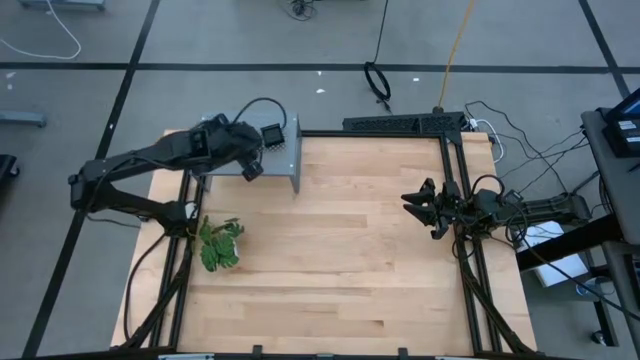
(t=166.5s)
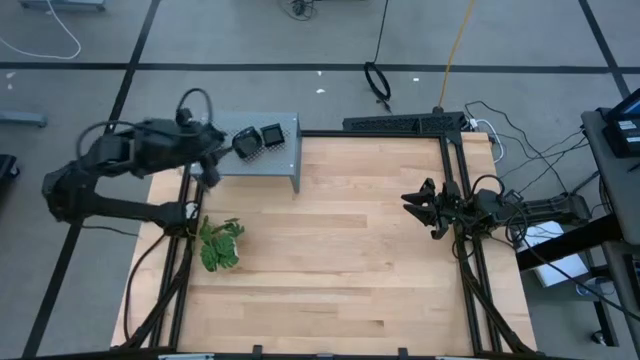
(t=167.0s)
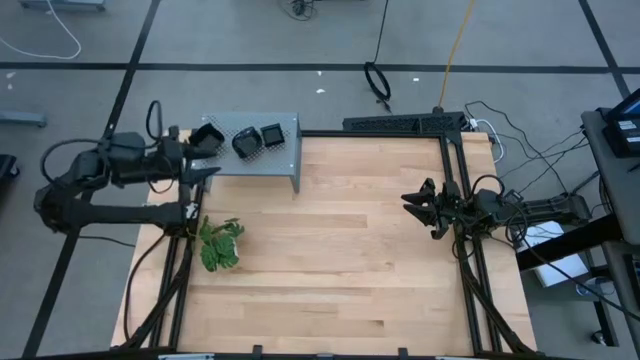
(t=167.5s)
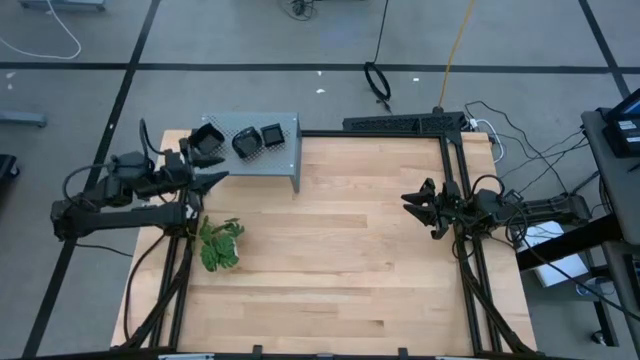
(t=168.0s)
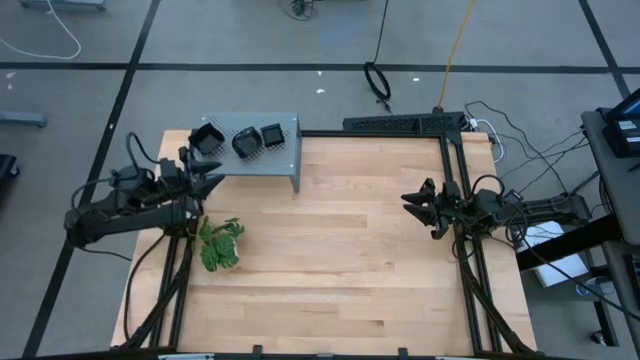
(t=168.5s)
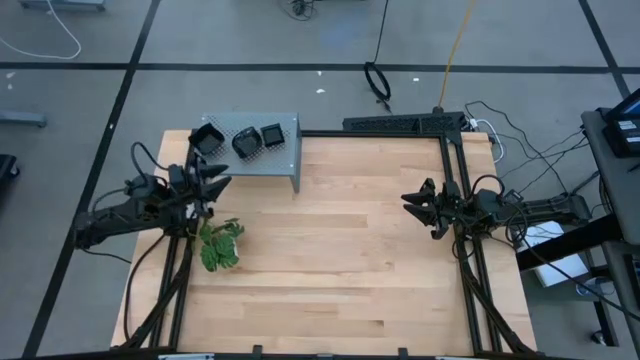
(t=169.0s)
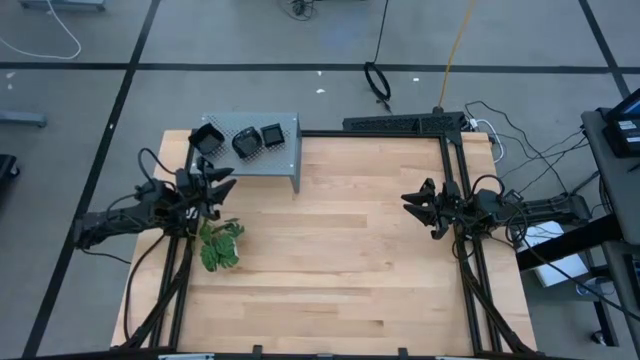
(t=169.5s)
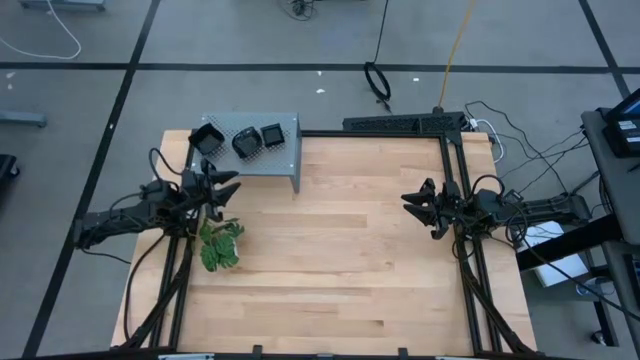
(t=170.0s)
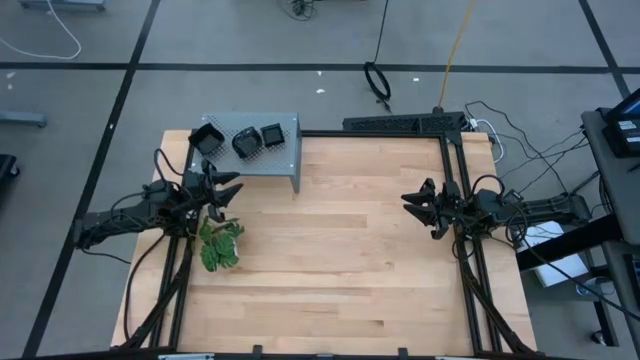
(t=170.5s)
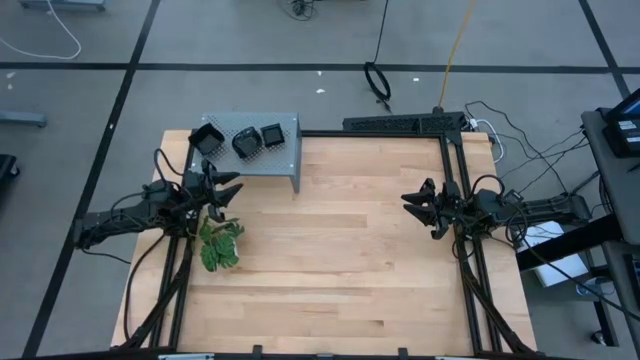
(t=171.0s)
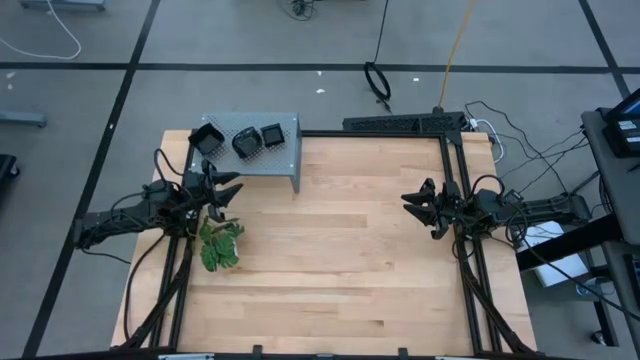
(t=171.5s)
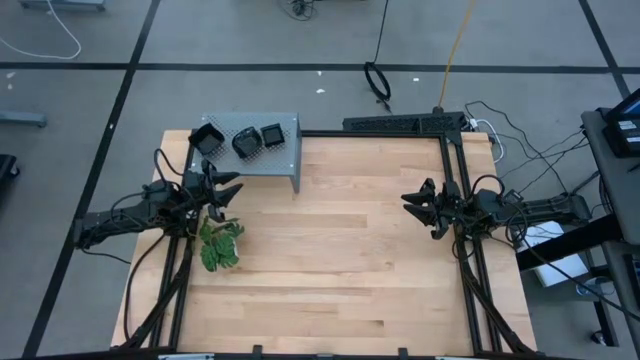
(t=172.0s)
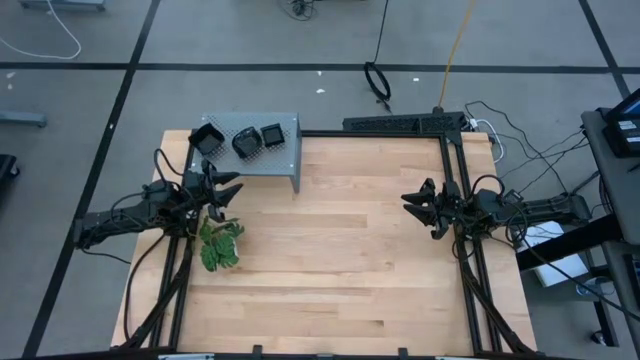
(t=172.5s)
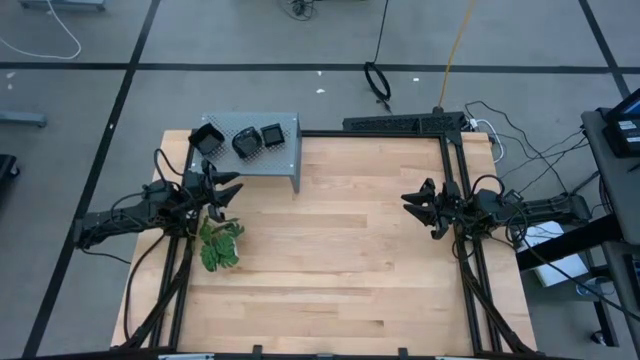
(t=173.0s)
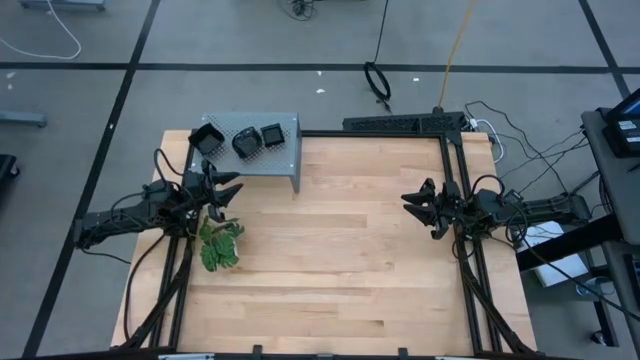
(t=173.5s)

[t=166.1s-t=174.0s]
Task: Pick & Place Mini shaped plates
Return to Home Position

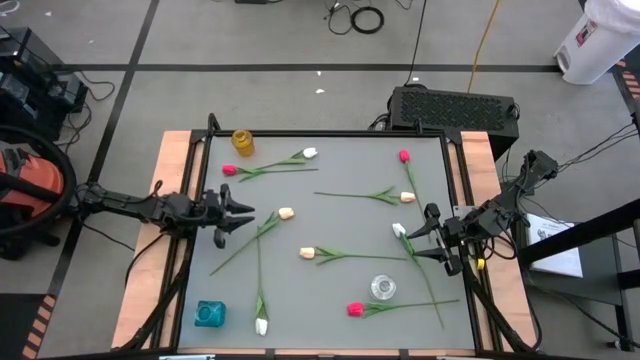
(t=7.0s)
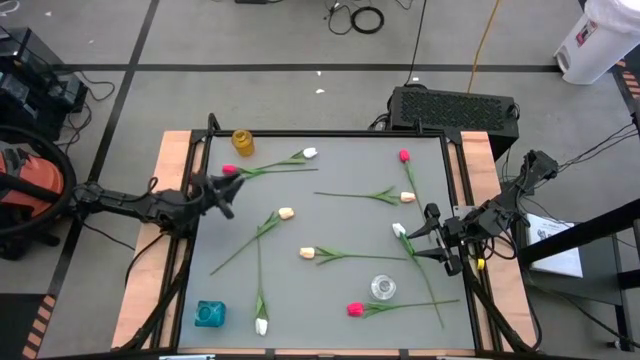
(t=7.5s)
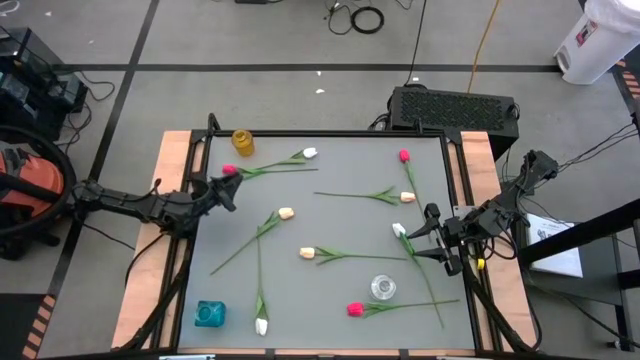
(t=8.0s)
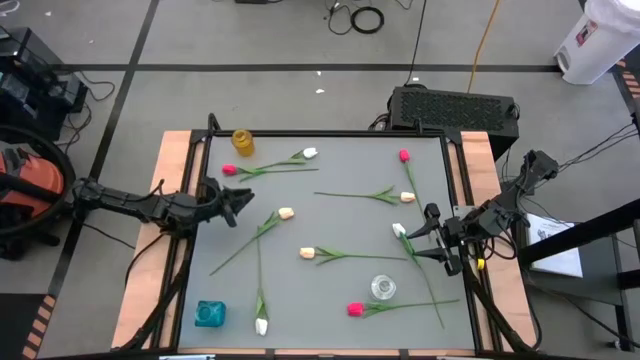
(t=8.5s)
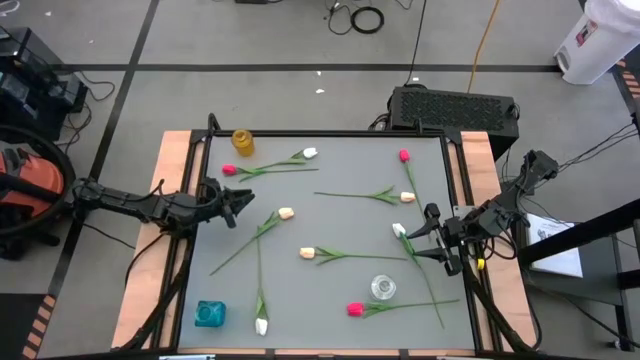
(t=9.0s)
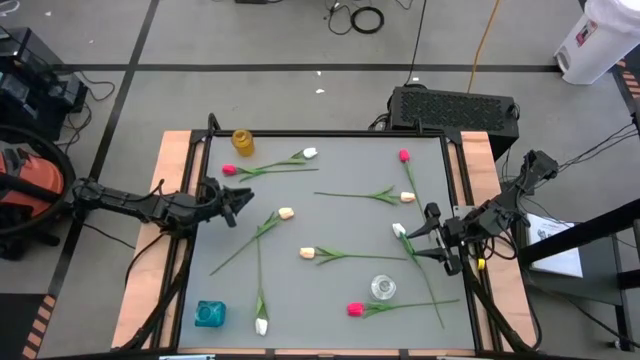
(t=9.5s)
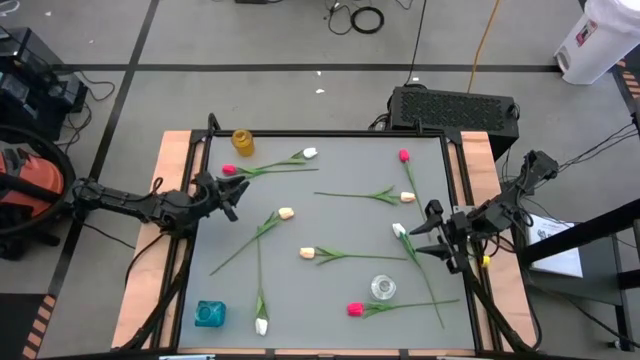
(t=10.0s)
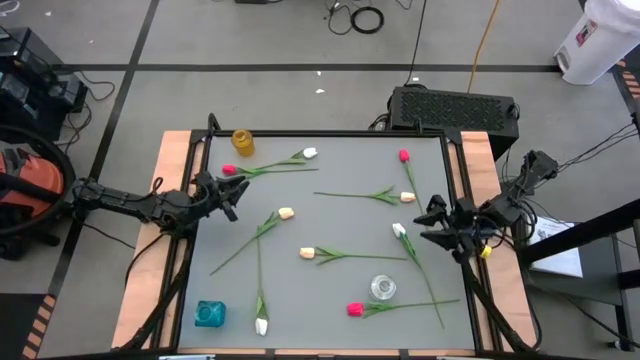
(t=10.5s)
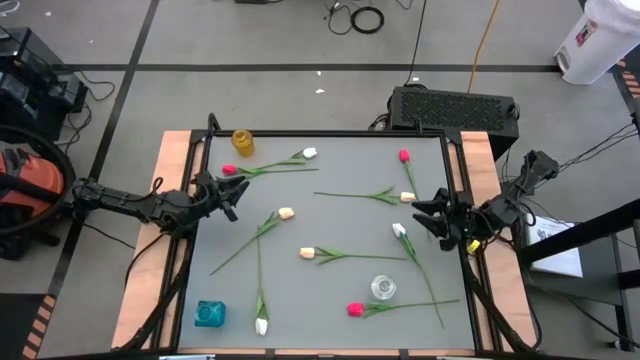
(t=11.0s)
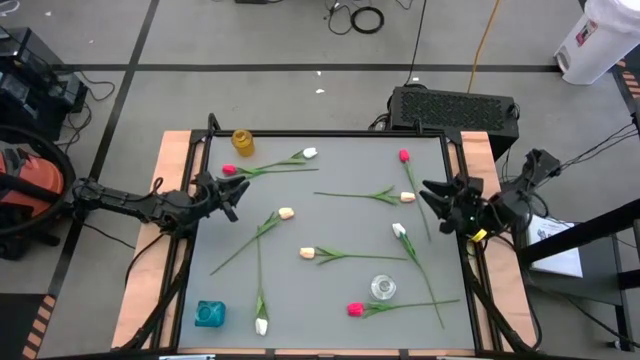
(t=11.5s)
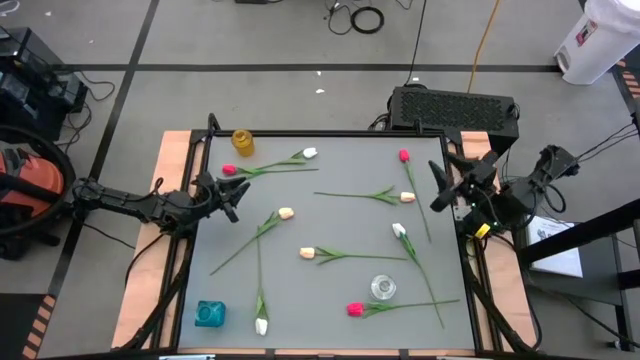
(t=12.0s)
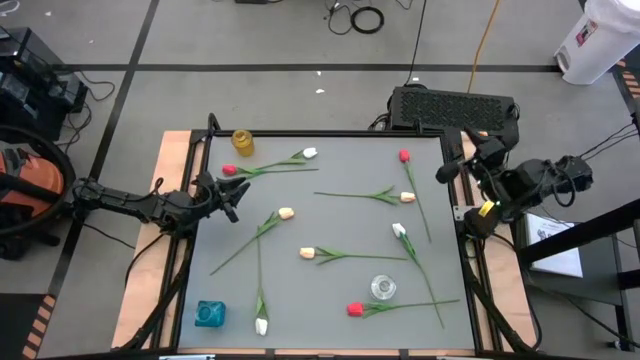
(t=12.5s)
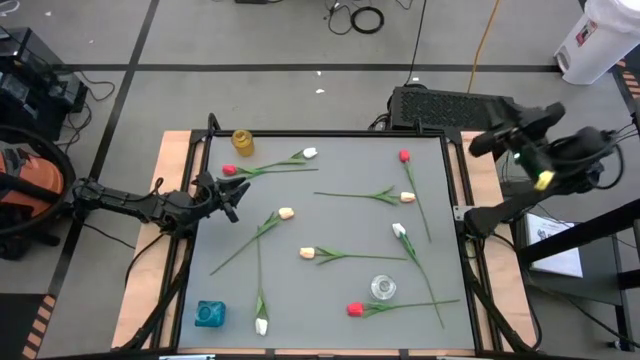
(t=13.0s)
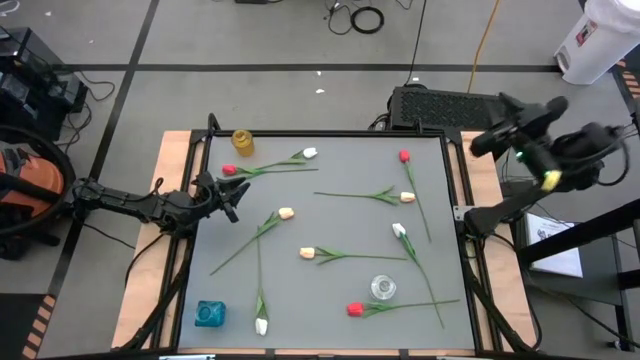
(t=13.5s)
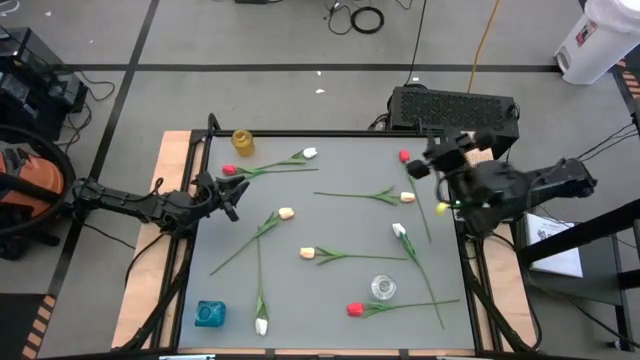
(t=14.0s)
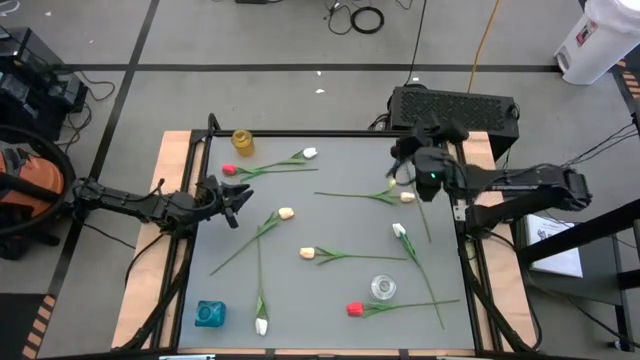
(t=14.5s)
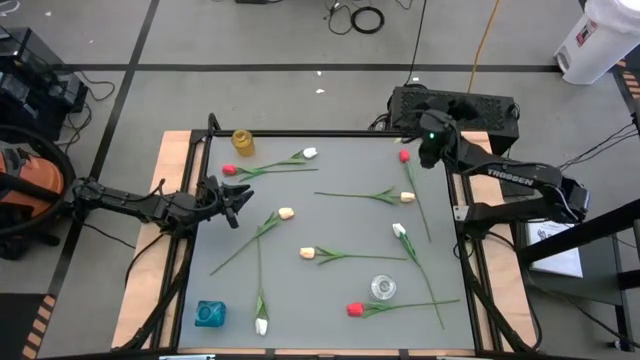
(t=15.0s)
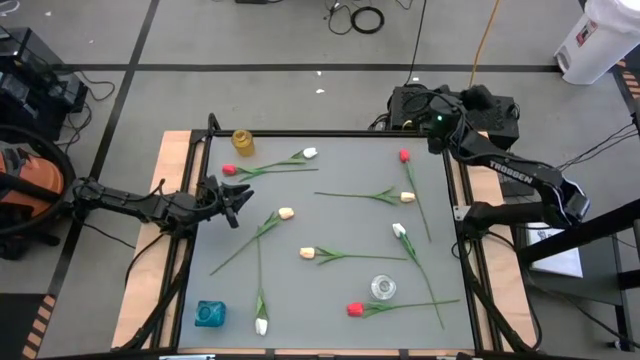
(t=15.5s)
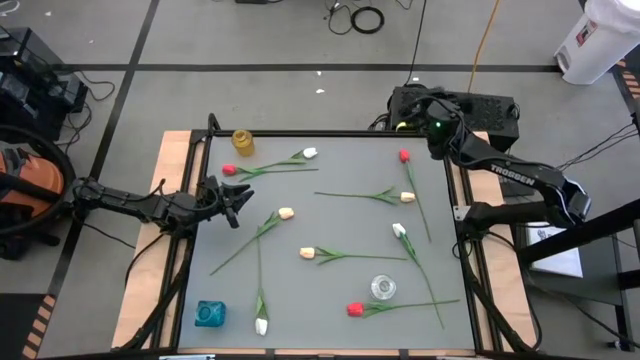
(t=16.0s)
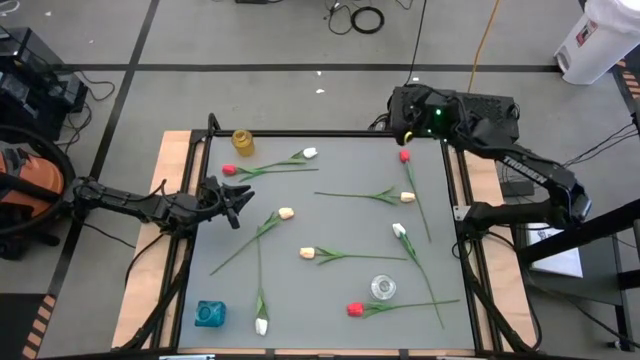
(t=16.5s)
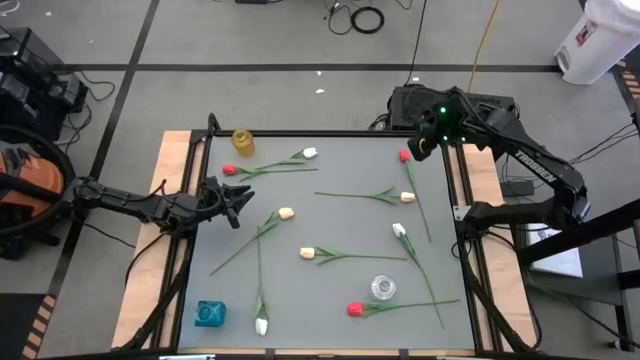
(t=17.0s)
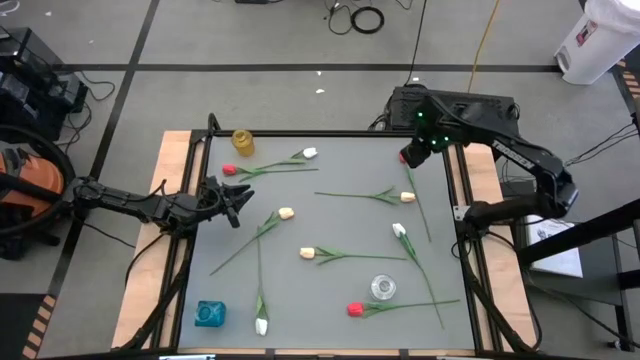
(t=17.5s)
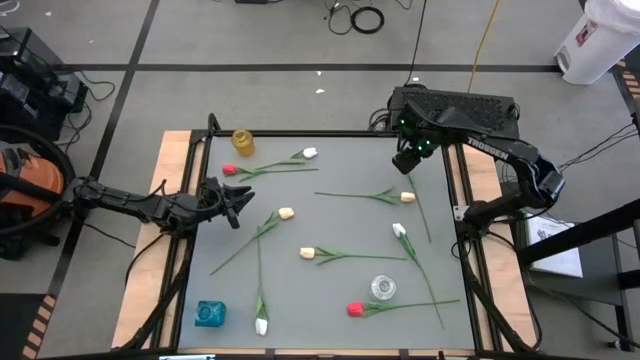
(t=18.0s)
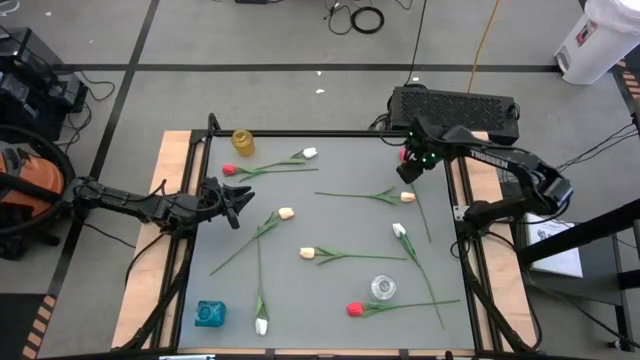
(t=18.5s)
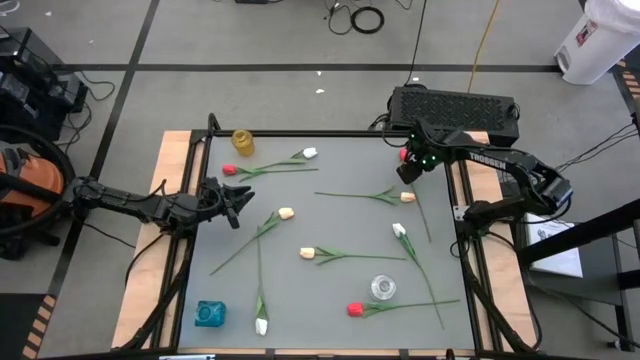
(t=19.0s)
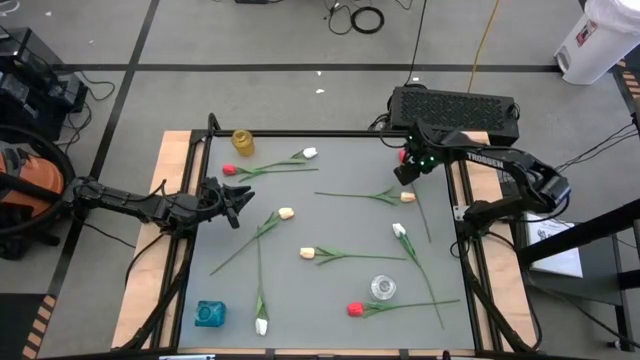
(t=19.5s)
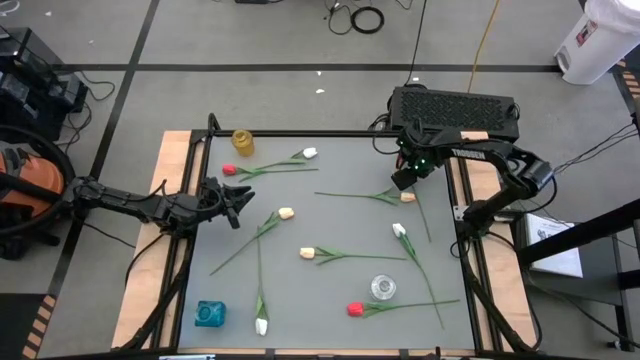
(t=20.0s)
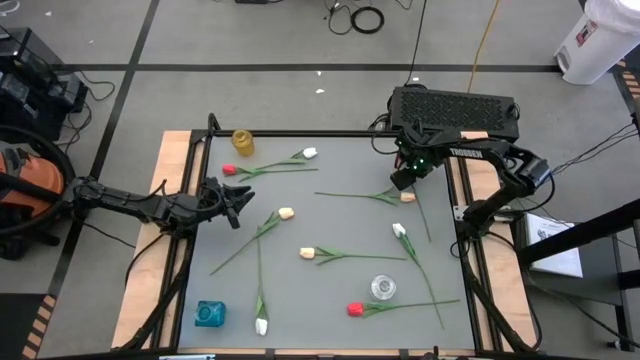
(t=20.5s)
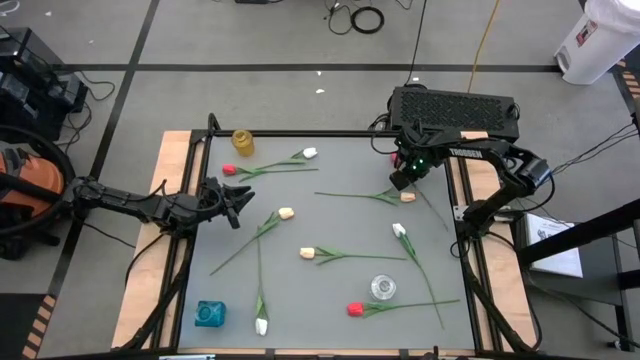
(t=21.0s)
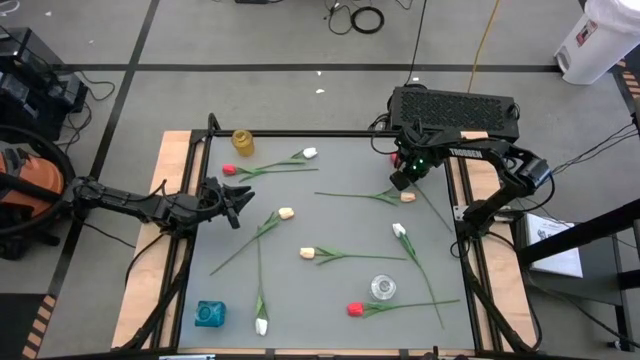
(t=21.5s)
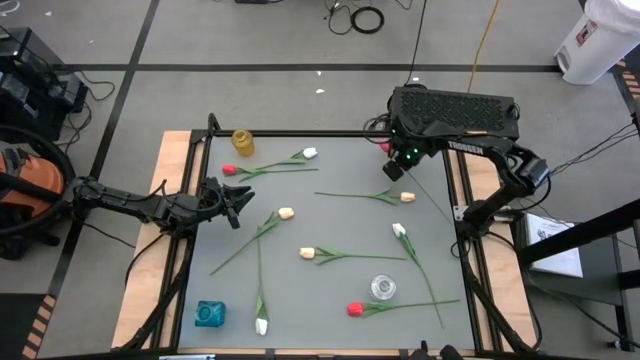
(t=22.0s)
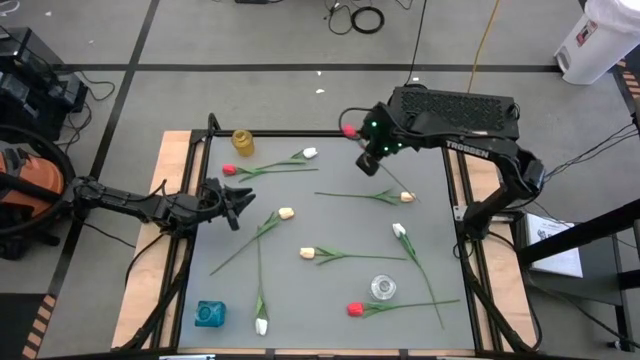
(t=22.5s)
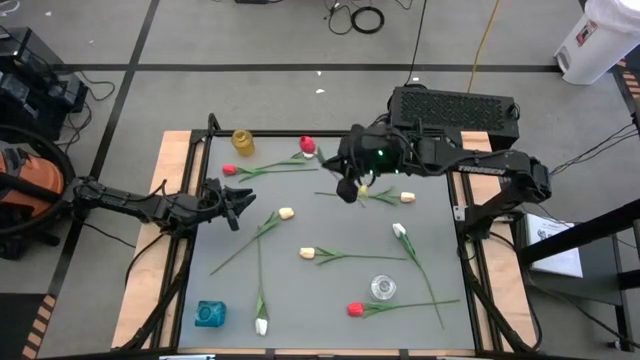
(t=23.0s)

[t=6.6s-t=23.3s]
Task: Sort flowers into vase by color
Put the top right red tulip into the yellow vase
